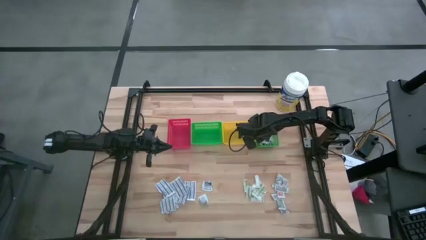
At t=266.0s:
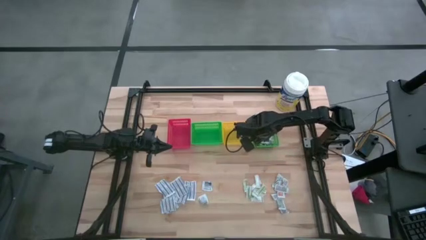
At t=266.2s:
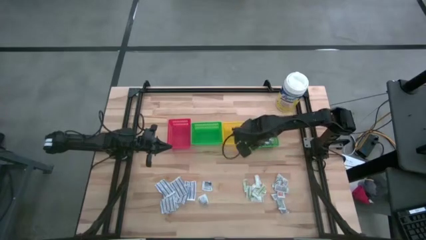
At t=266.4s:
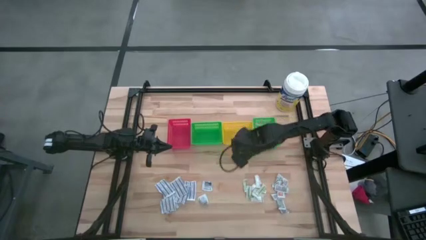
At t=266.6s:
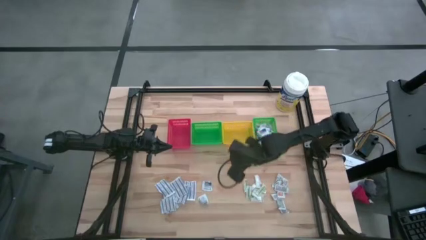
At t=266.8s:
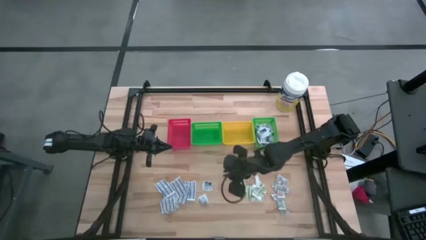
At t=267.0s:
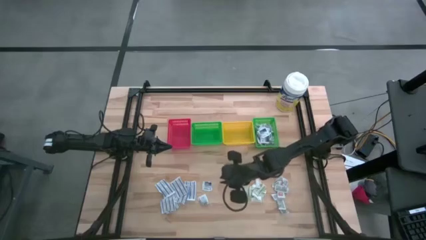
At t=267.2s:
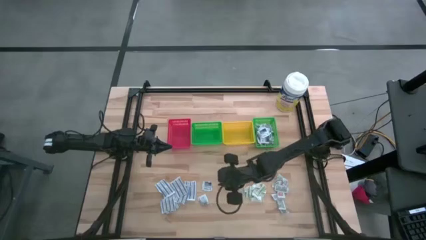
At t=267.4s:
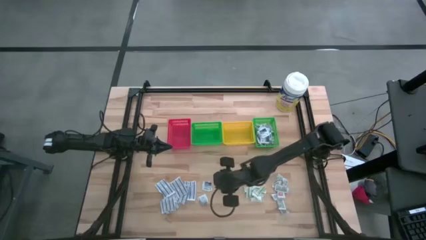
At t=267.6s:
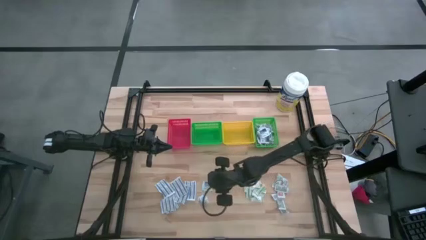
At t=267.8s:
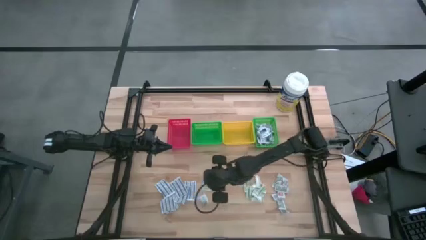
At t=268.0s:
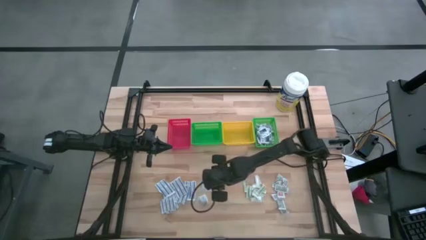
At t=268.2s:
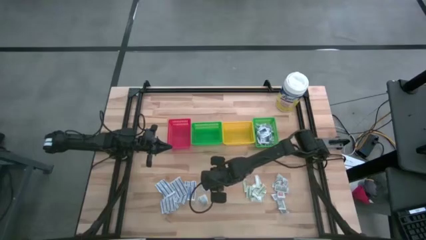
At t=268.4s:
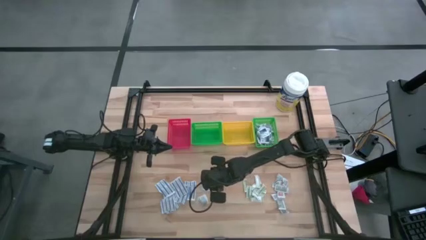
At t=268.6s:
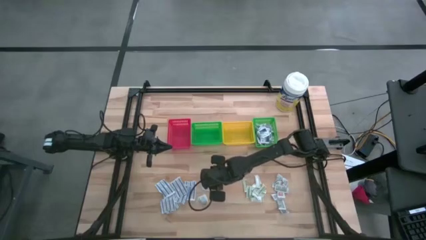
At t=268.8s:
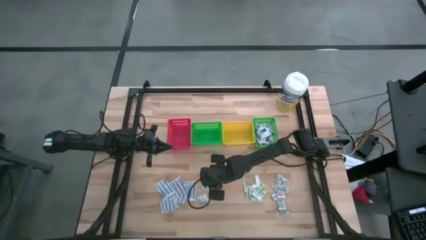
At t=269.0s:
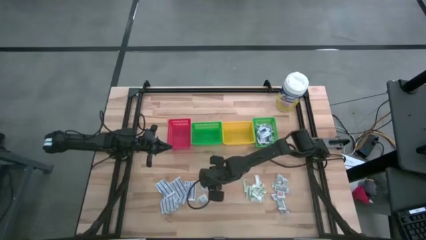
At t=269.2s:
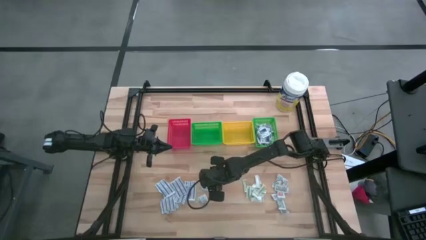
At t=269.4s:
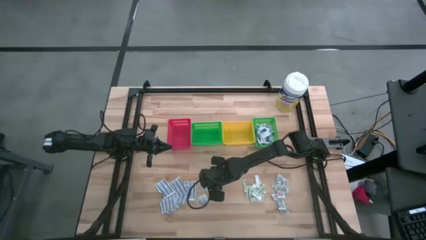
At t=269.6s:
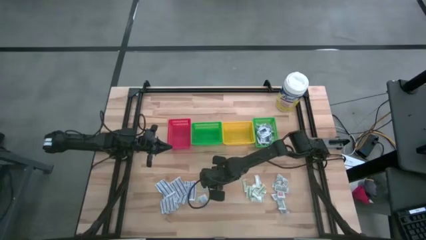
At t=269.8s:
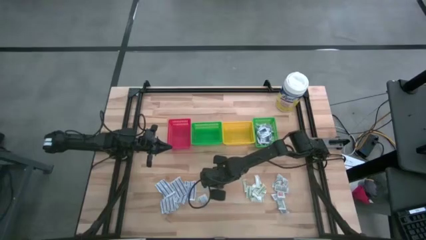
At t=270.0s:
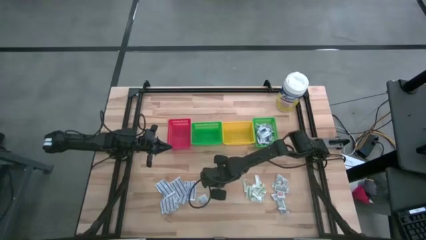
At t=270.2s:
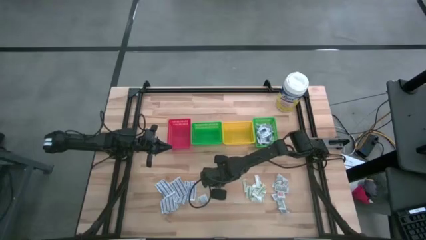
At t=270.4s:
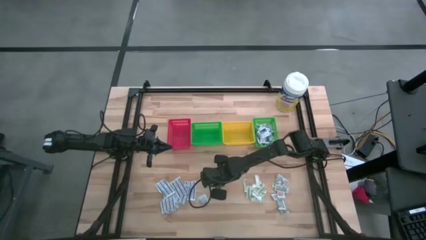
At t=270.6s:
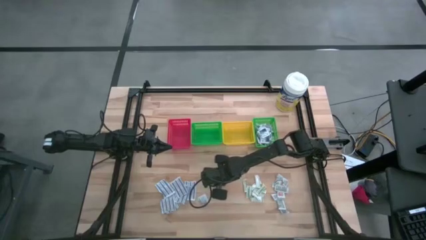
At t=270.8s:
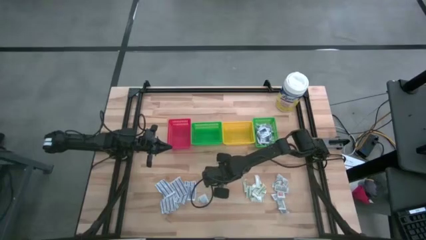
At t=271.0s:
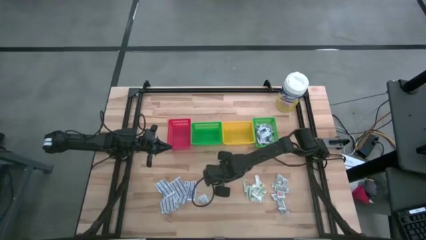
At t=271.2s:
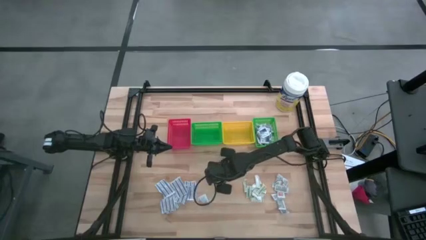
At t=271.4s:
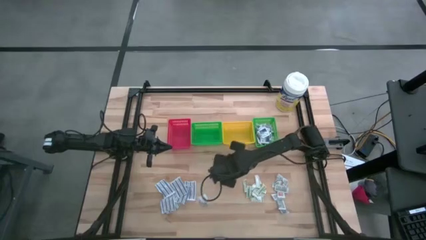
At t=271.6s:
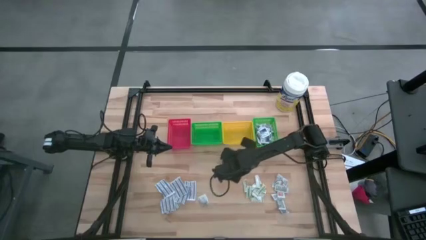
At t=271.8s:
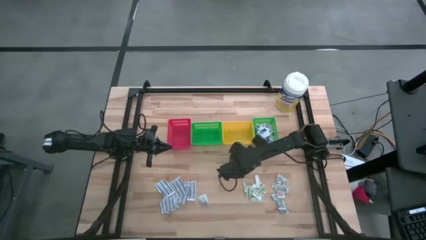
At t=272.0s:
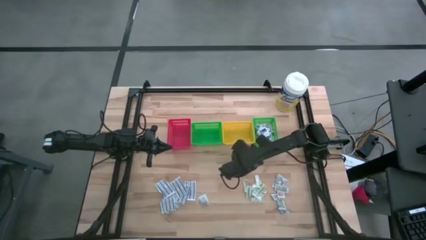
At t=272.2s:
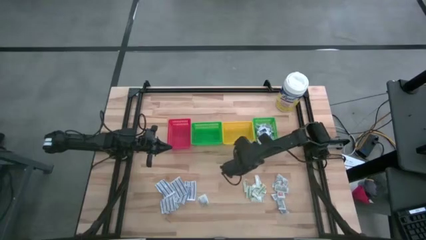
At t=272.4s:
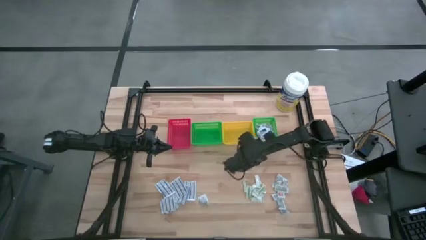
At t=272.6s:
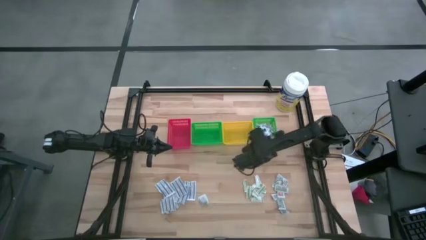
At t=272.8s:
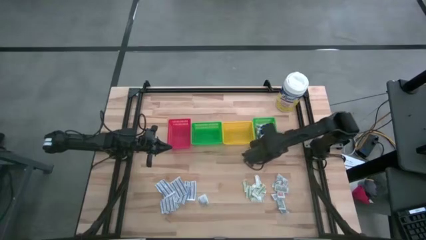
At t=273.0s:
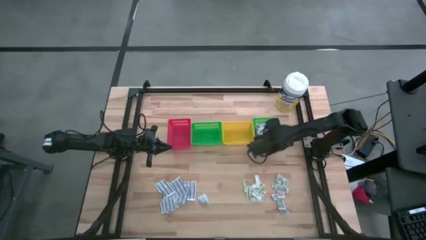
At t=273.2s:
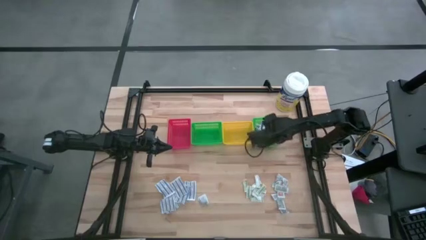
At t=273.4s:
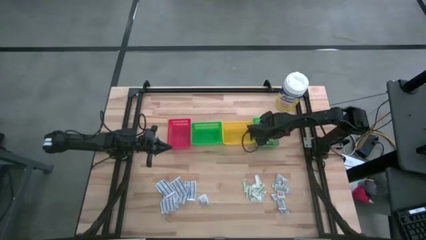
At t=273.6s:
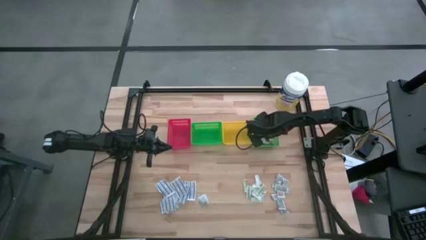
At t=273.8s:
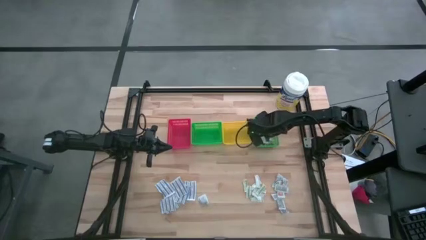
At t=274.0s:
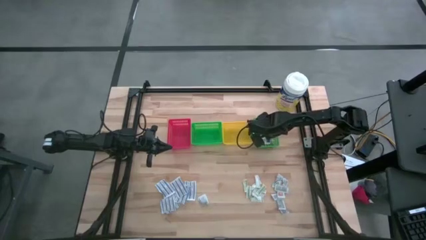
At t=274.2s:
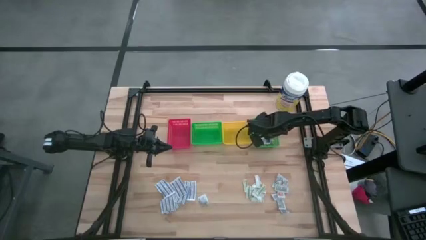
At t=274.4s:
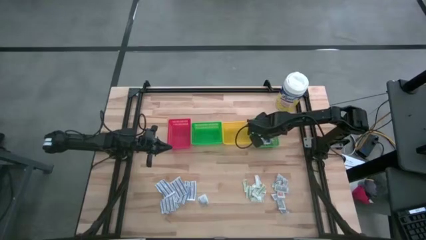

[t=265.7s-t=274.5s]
Task: Pick & Place First Aid Supplies
Put the blue alcohol pad into the right green bin

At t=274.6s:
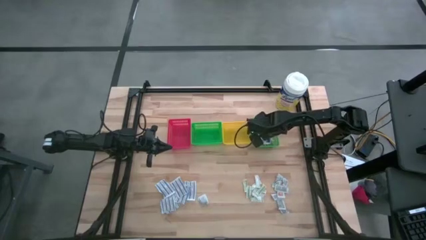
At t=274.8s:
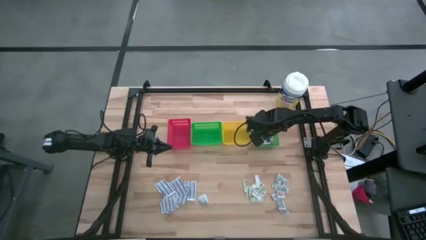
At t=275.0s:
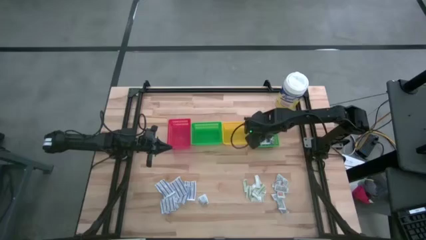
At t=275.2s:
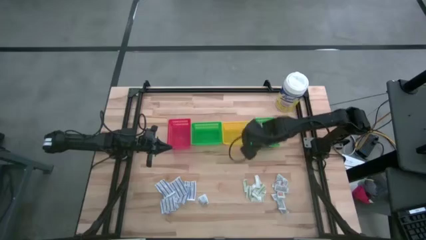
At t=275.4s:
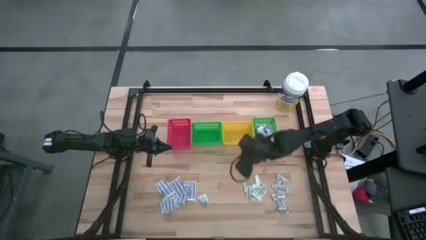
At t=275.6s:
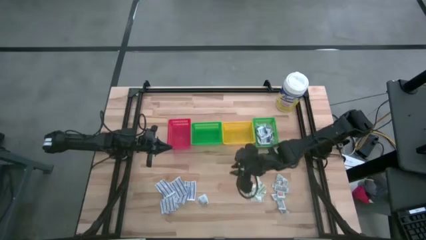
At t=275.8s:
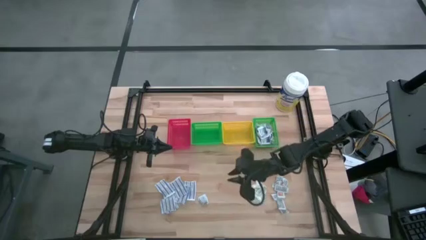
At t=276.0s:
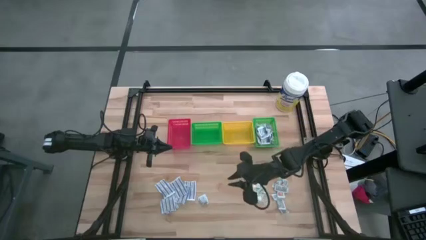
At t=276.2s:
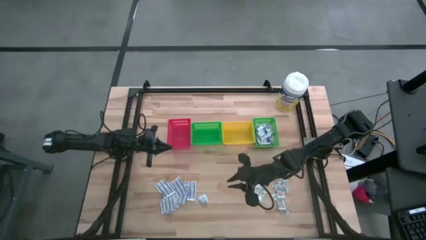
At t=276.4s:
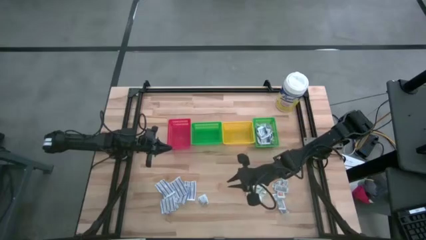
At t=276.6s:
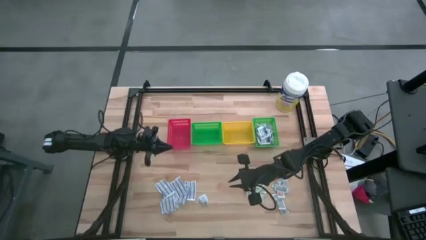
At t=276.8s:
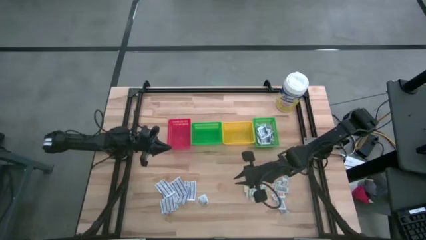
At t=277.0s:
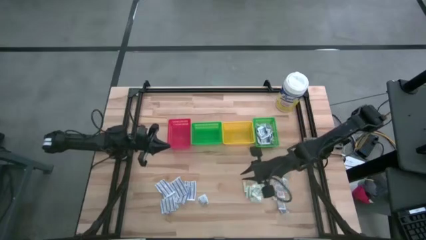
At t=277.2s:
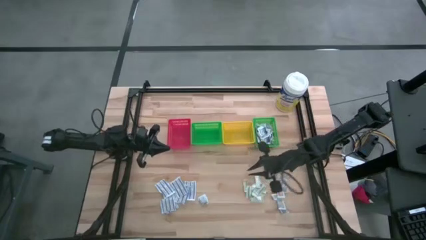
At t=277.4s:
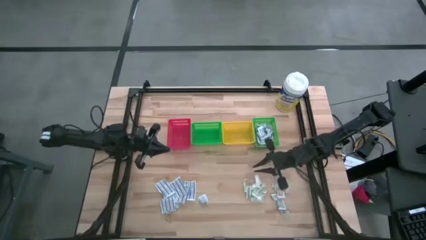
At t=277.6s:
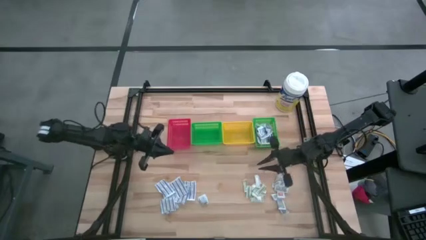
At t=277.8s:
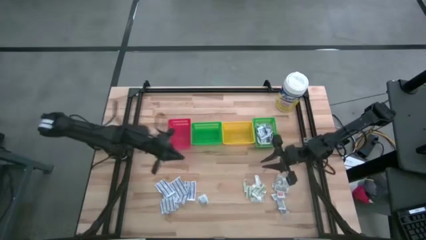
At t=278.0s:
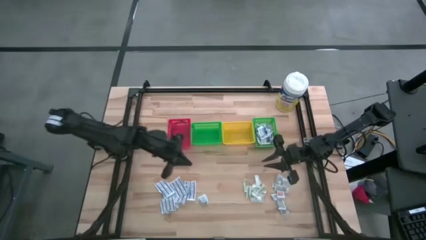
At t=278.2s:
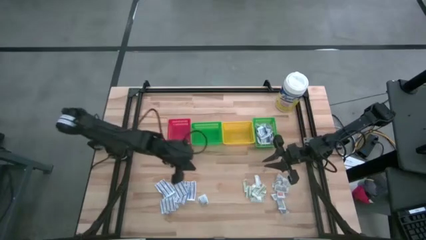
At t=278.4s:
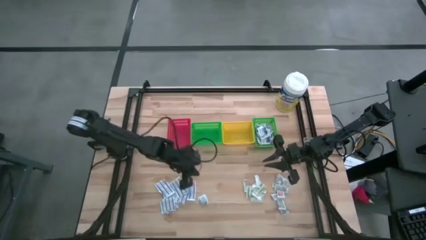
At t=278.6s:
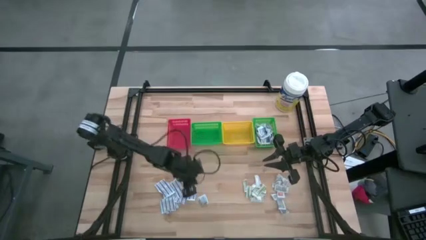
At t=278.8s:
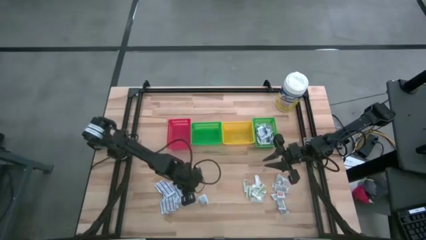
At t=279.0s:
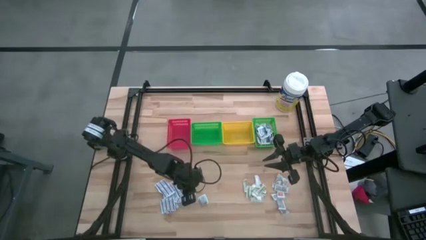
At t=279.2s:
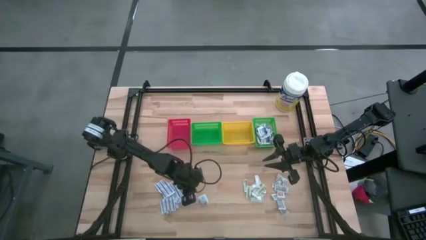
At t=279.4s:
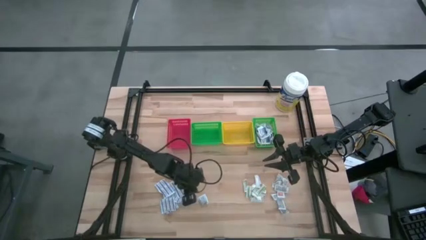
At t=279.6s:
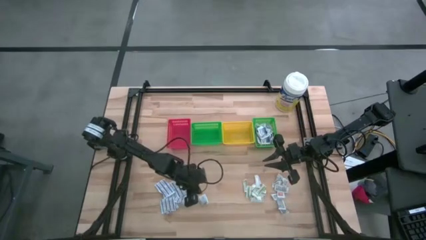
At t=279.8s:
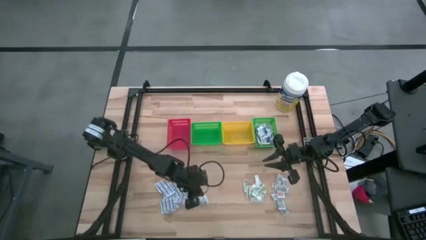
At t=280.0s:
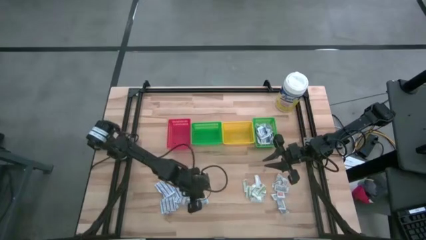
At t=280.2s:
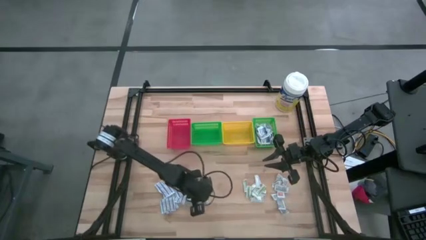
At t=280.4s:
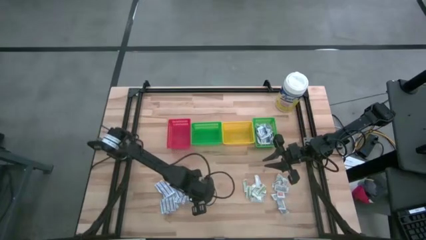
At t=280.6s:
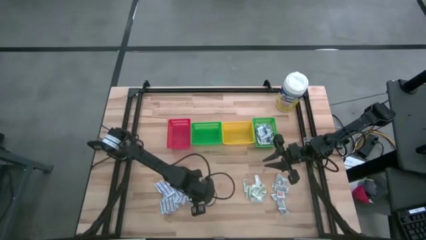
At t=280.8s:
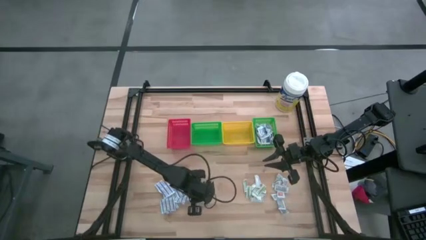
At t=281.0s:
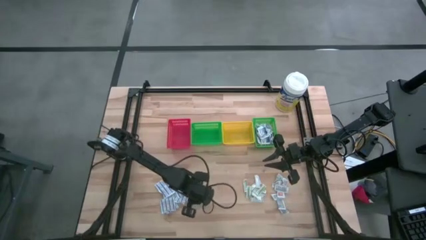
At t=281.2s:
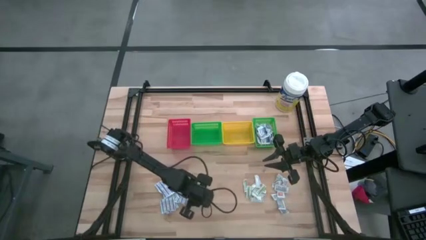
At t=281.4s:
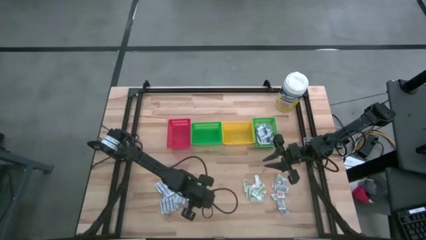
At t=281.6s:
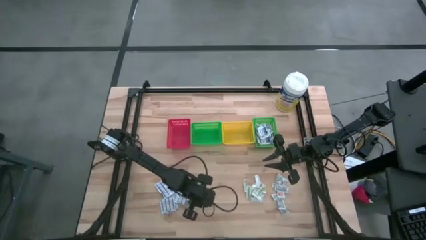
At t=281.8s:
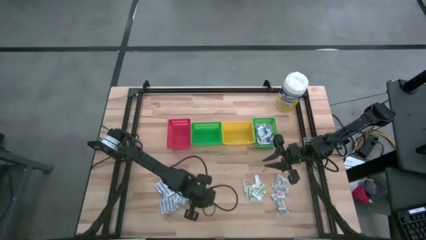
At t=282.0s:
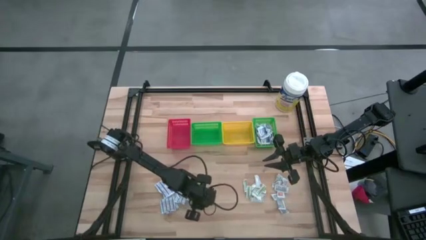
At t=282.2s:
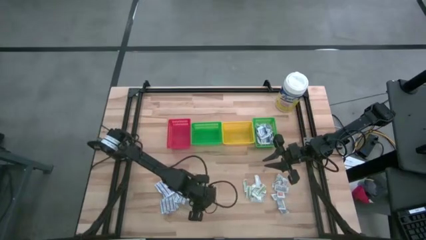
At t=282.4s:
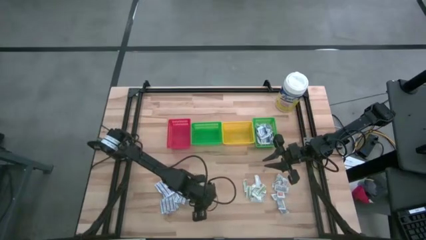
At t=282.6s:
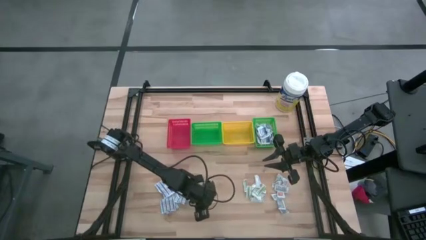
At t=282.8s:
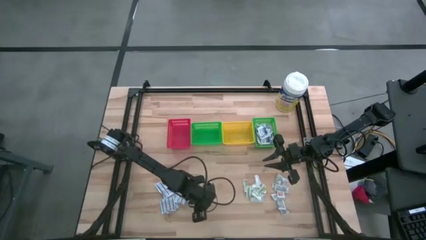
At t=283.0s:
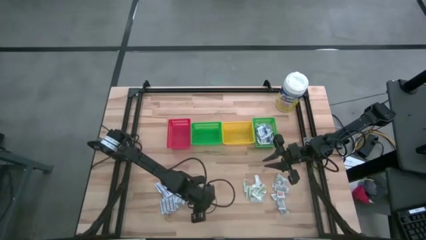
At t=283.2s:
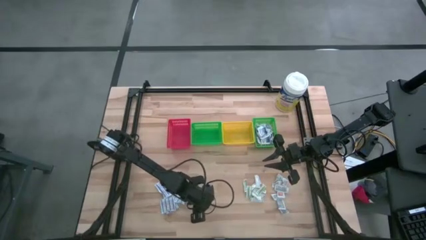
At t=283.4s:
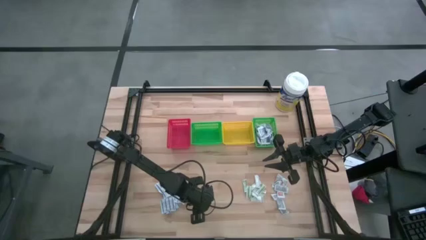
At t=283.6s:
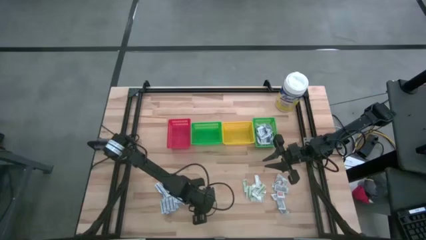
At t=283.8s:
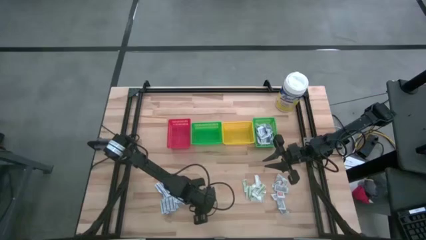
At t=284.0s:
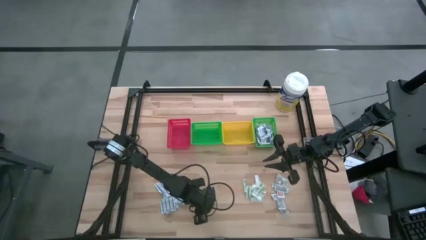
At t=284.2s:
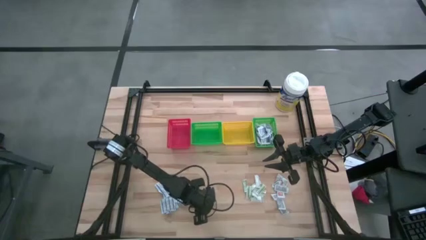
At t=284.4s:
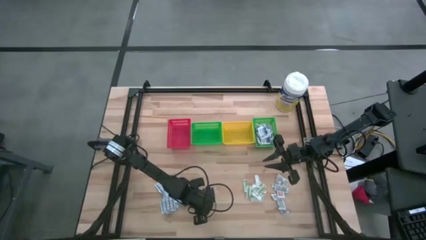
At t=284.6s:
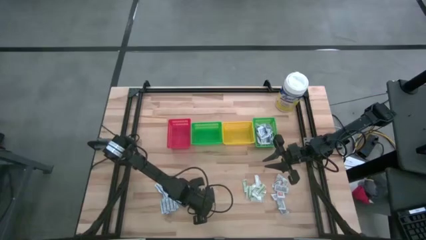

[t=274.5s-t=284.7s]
Put the blue alcohol pad into the right green bin
